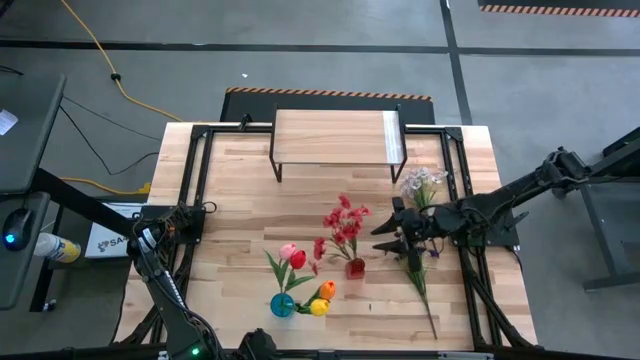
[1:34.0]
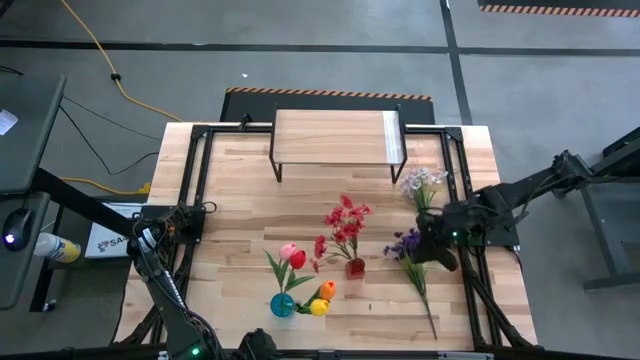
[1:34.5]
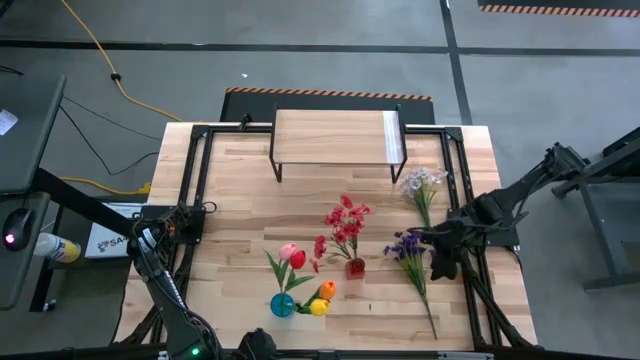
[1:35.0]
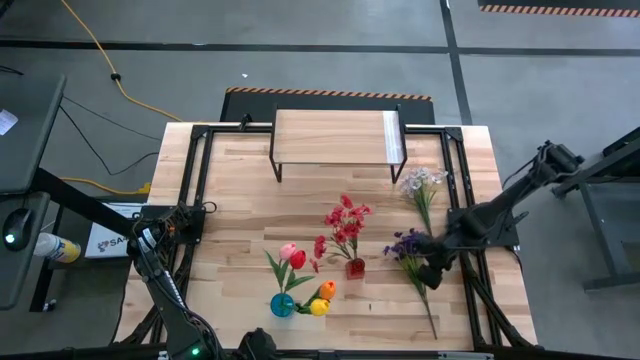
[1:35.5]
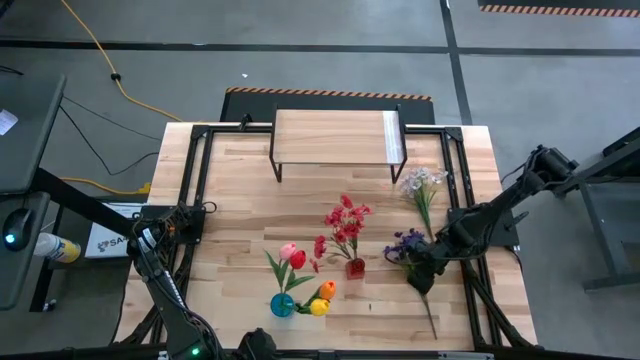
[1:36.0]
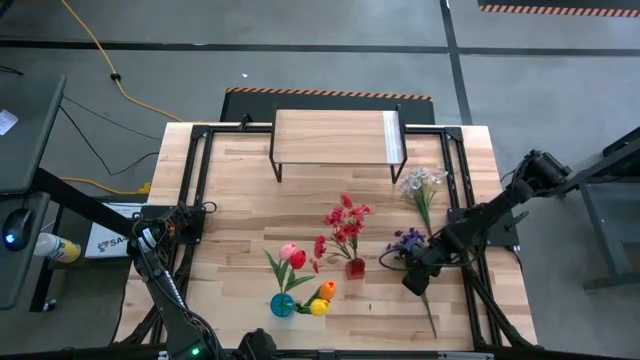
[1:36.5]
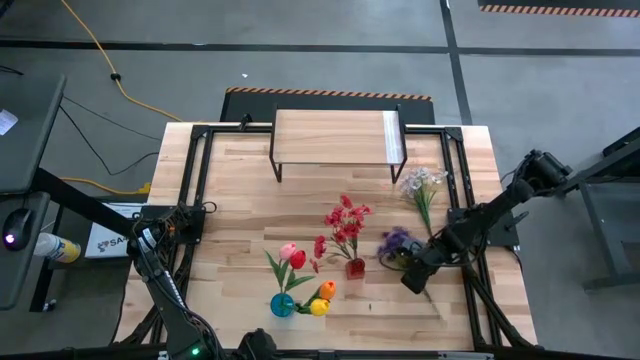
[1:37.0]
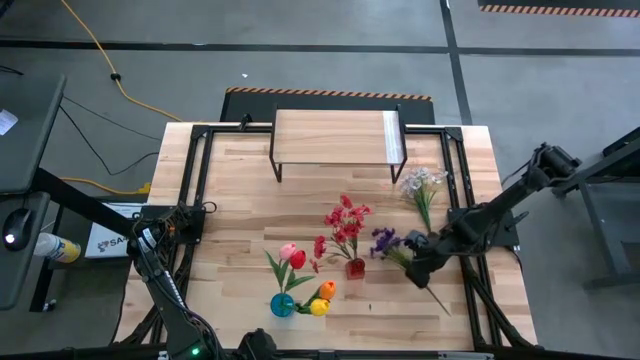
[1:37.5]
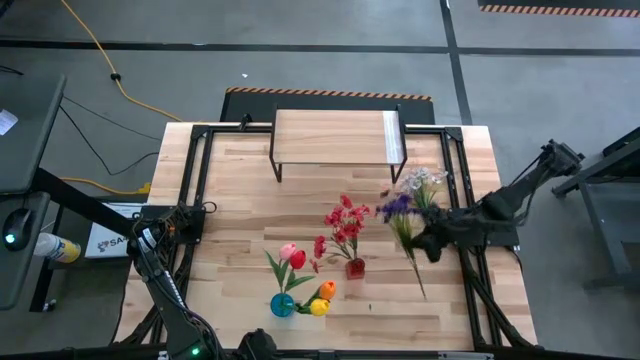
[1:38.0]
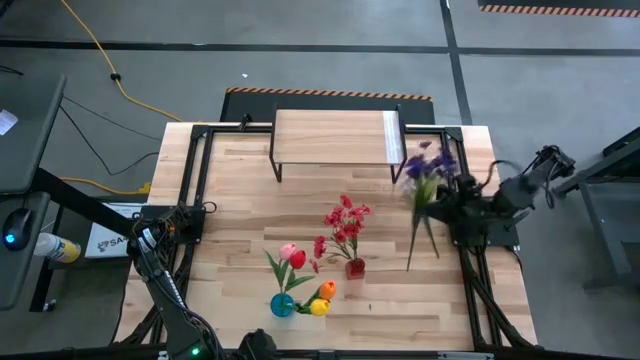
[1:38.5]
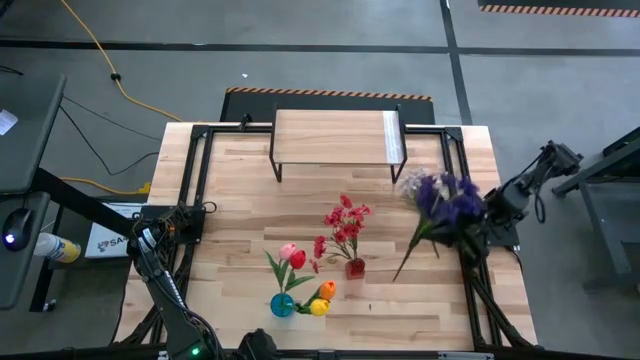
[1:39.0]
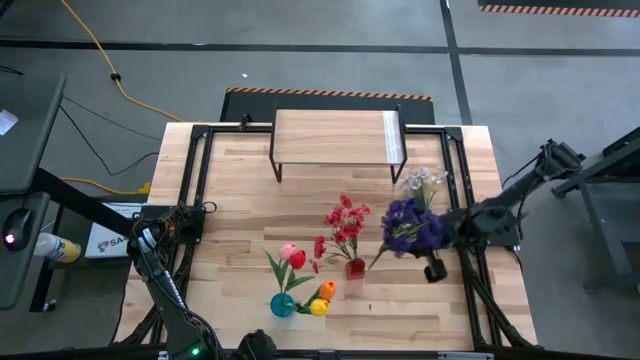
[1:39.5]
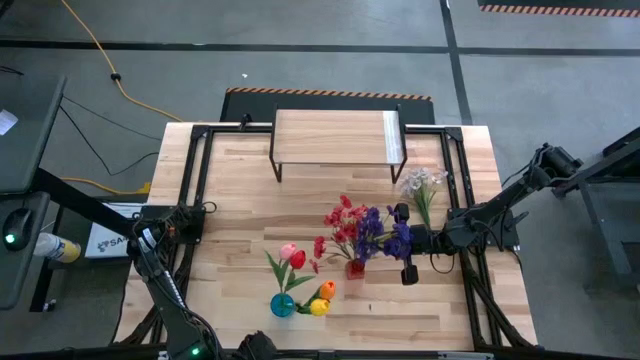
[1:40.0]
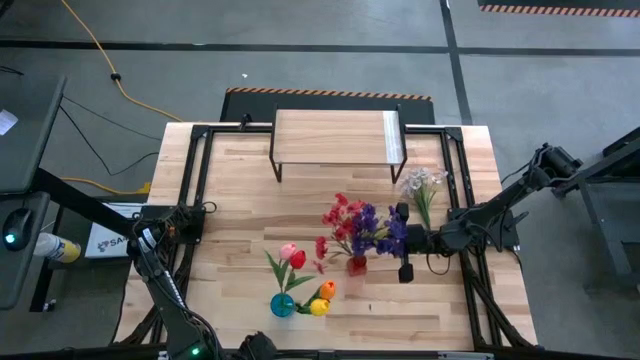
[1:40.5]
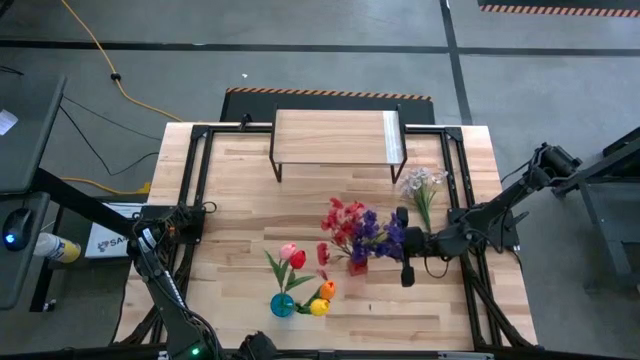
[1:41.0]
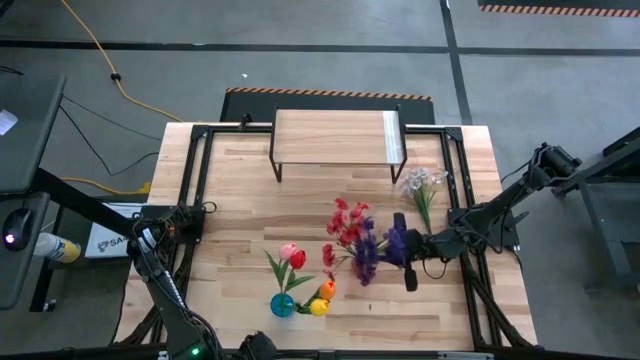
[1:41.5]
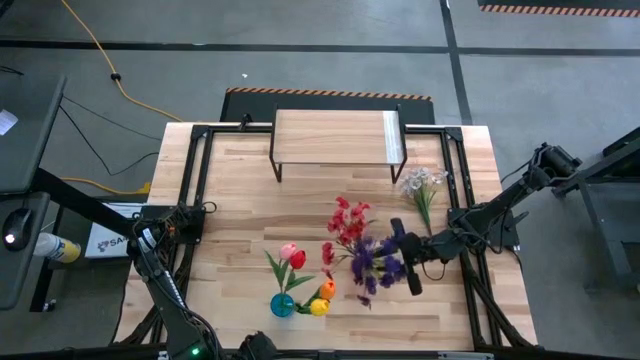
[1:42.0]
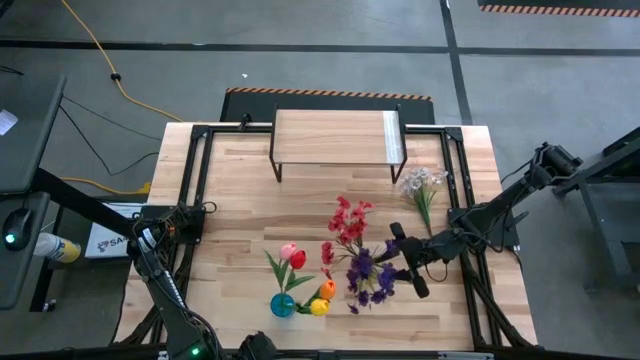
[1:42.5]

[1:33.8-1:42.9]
Task: Pick and place flowers into a vace then onto a shelf
Put the purple flowers into the red transparent vase

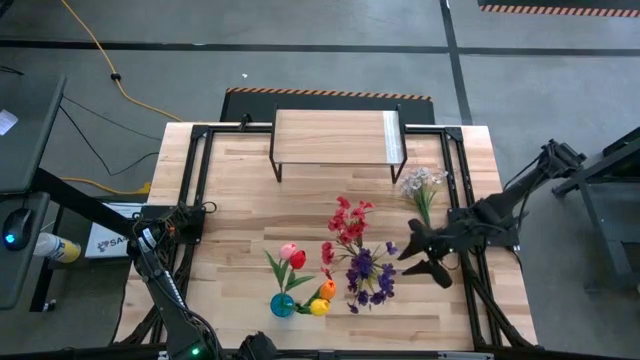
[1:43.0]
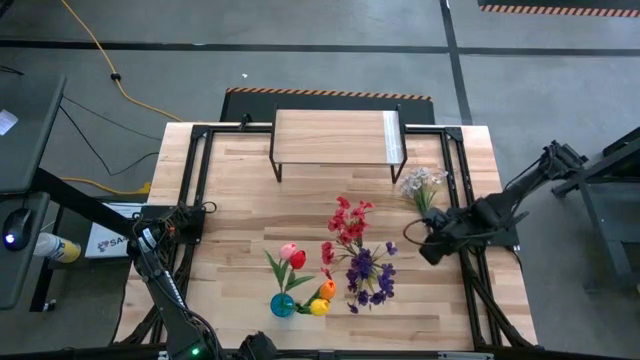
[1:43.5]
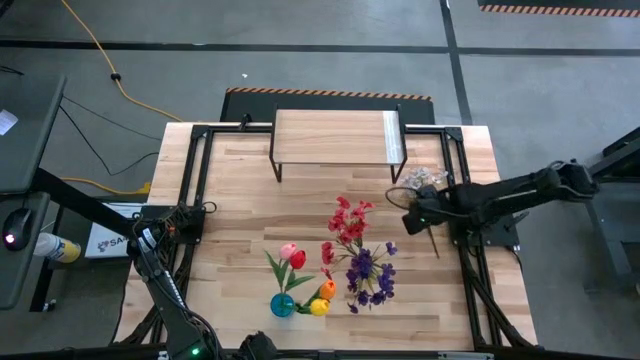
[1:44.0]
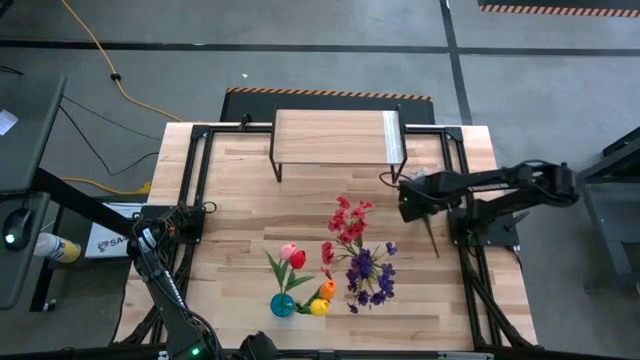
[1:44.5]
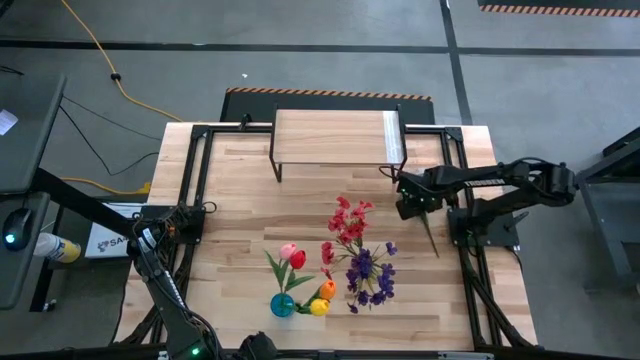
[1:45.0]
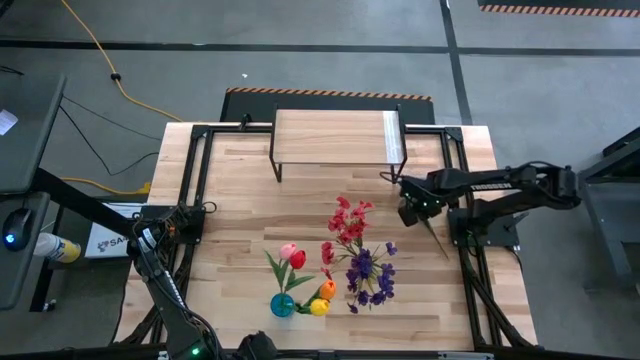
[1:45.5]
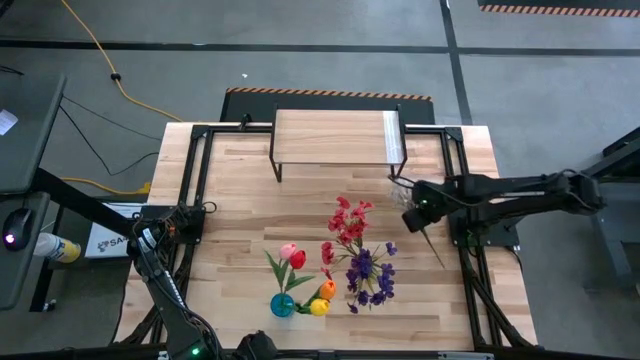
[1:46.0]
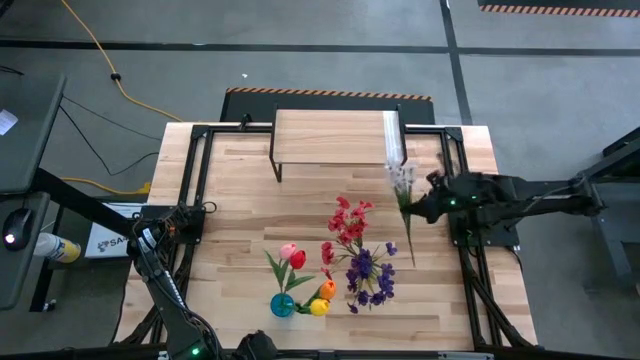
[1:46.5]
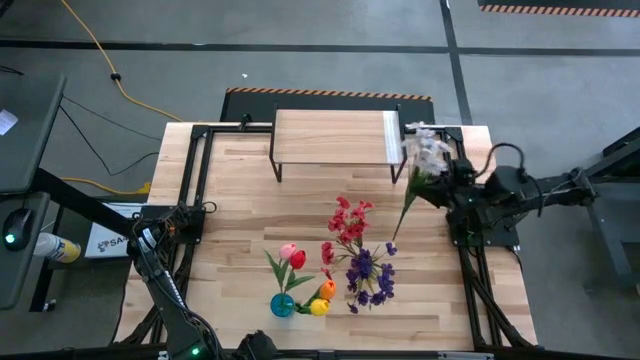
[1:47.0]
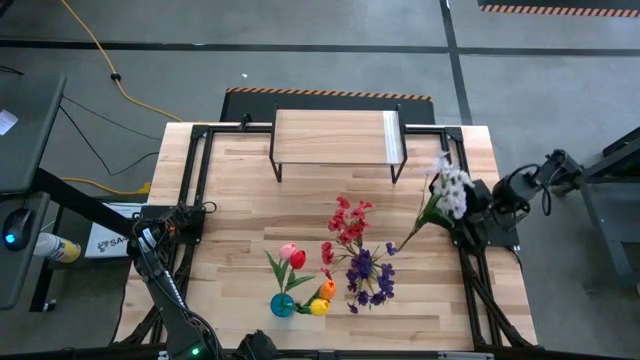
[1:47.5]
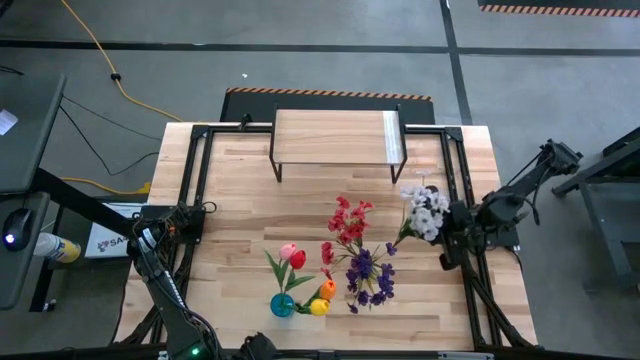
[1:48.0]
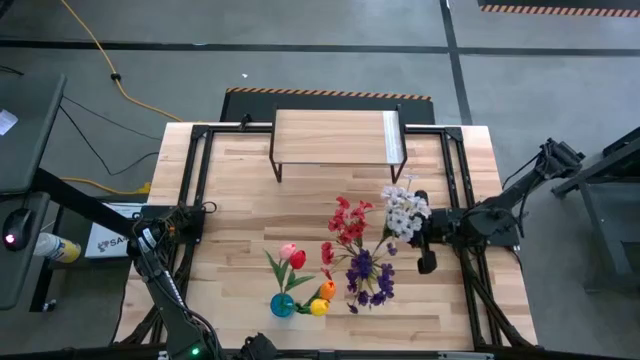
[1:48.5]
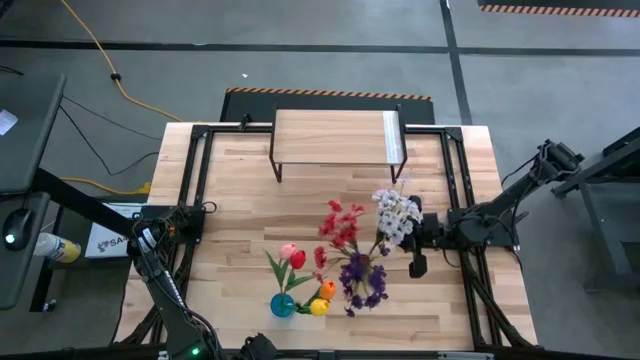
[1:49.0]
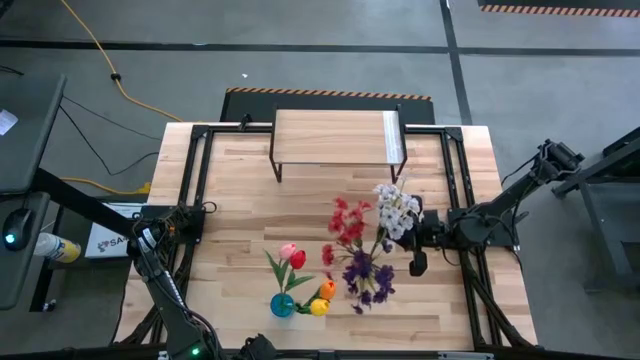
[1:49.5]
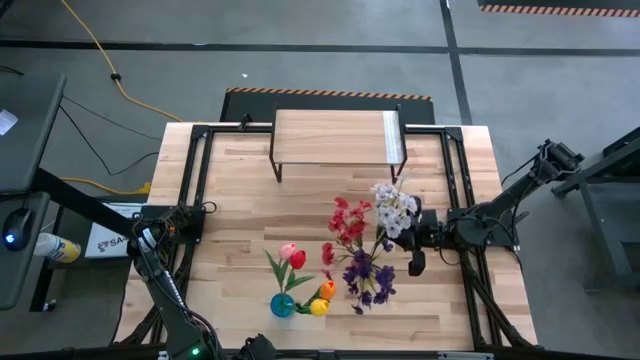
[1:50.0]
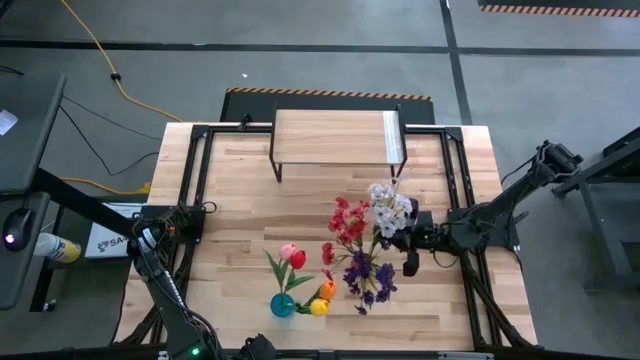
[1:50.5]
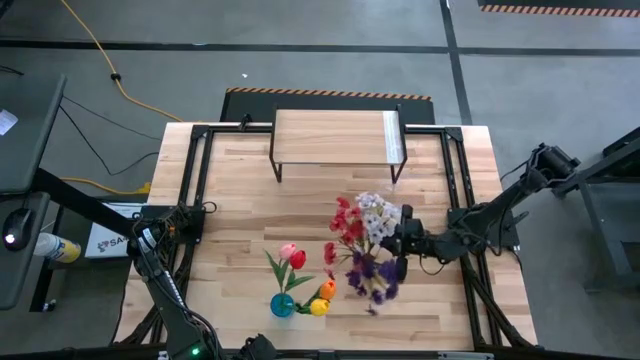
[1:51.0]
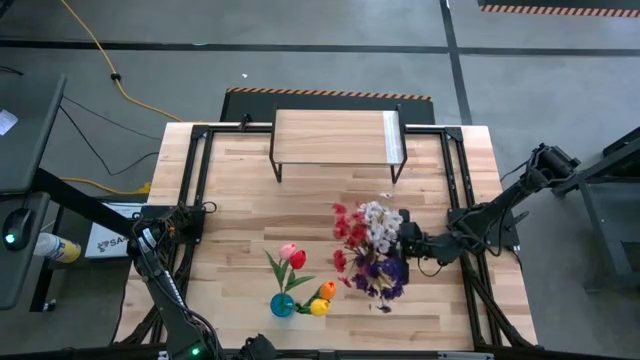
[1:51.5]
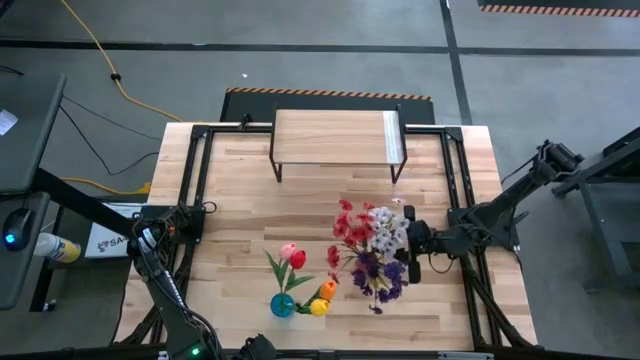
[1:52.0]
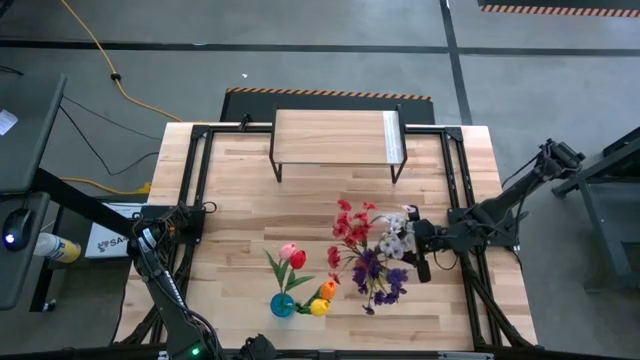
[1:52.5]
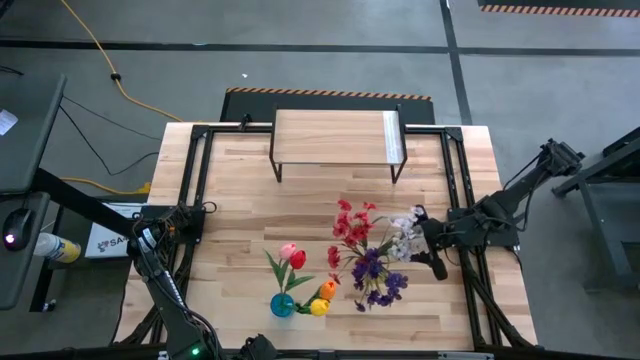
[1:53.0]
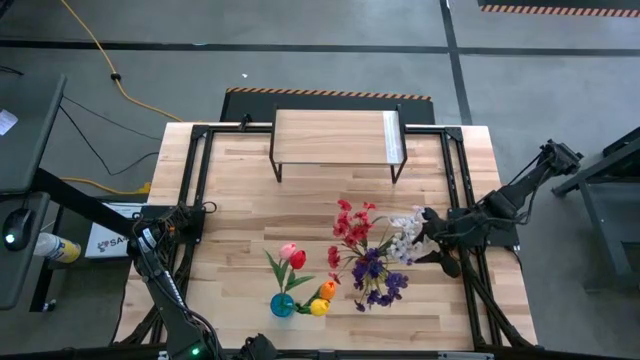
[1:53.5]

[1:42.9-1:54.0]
Put the white flowers into the red transparent vase

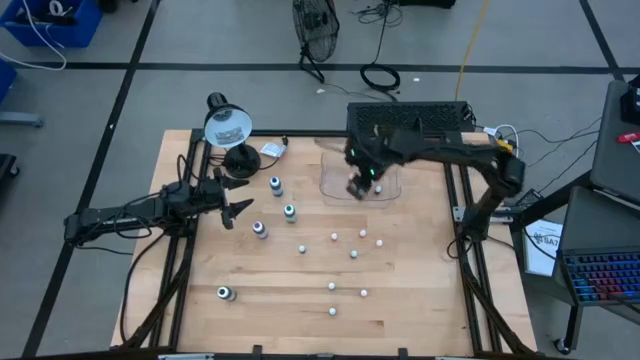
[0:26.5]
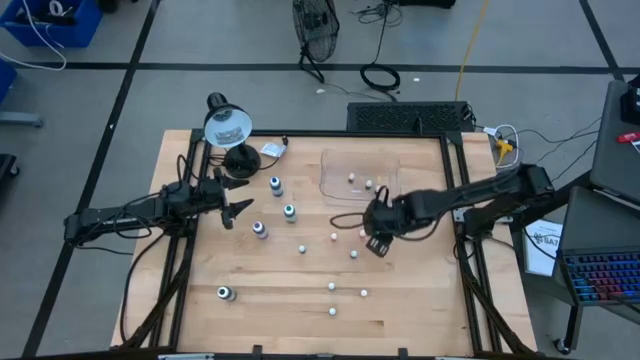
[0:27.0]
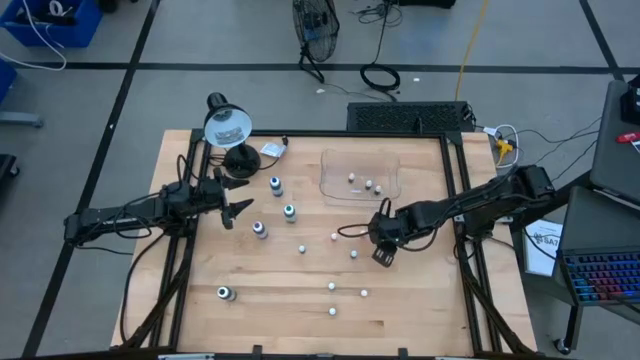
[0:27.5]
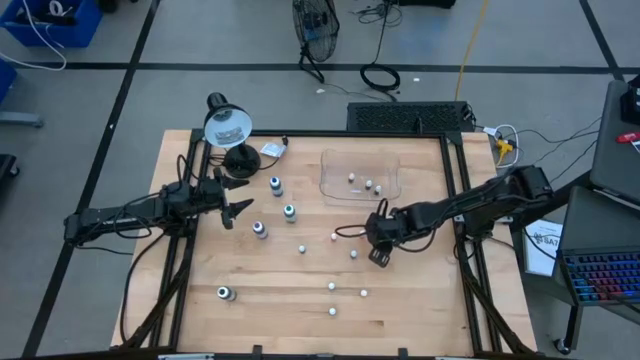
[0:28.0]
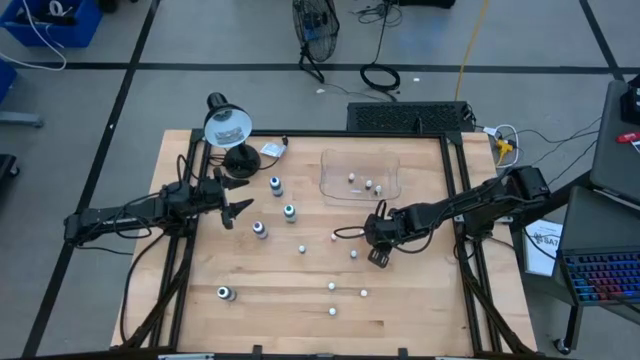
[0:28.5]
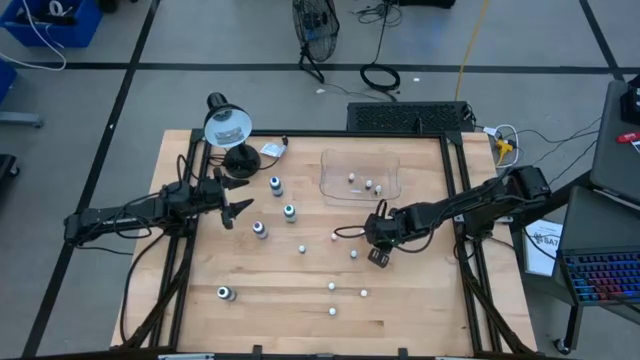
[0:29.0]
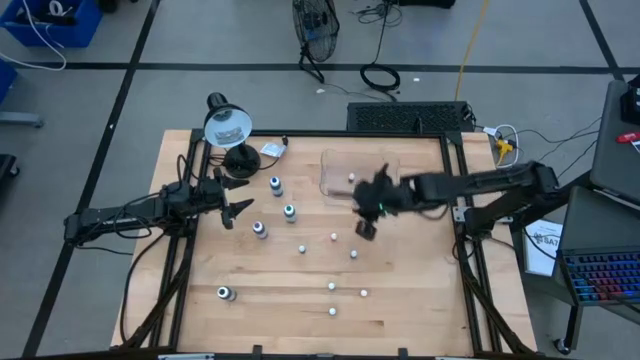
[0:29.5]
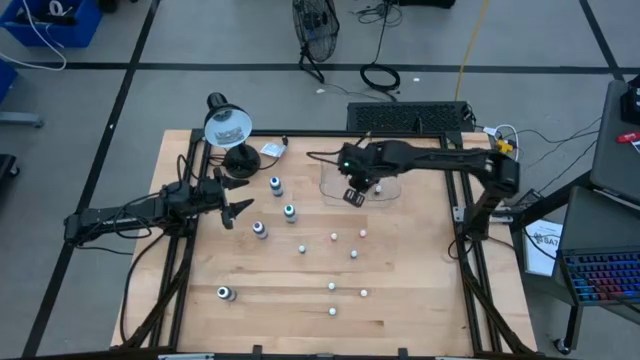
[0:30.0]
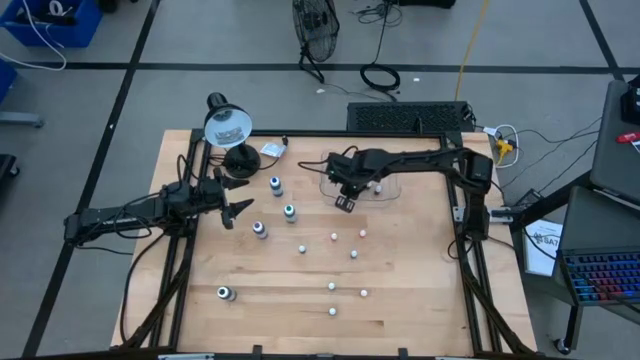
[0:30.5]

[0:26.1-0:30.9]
Task: Pick & Place food coloring
Put the orange food coloring into the transparent bin
